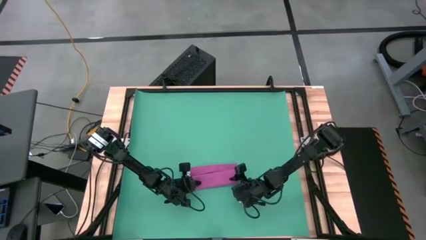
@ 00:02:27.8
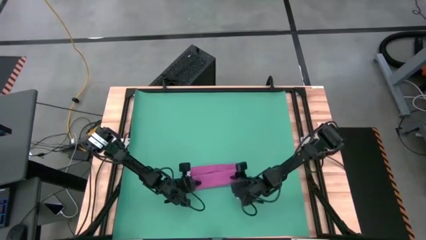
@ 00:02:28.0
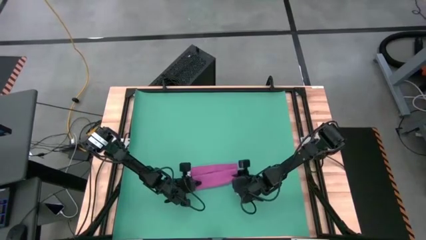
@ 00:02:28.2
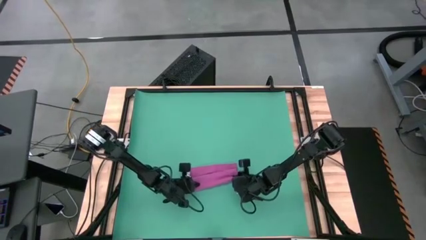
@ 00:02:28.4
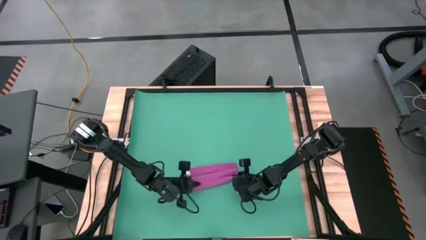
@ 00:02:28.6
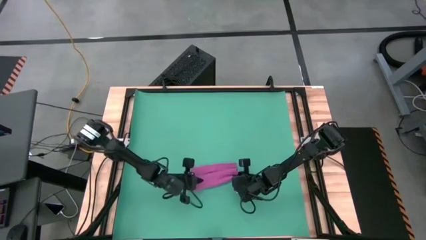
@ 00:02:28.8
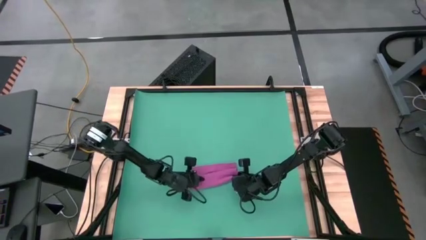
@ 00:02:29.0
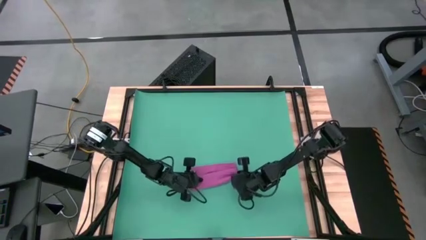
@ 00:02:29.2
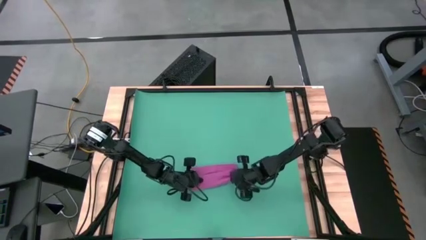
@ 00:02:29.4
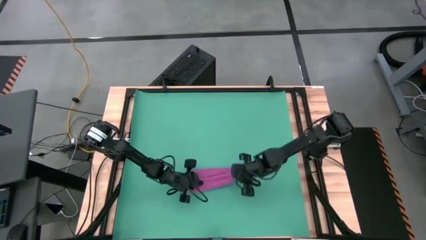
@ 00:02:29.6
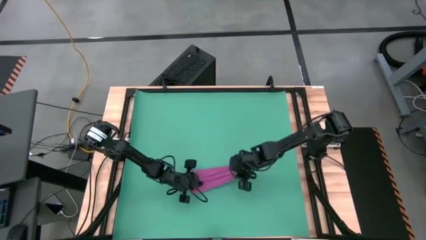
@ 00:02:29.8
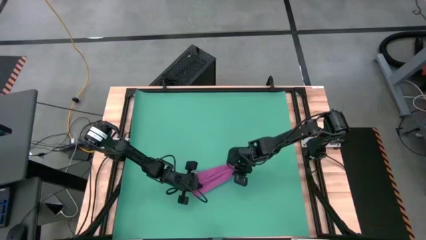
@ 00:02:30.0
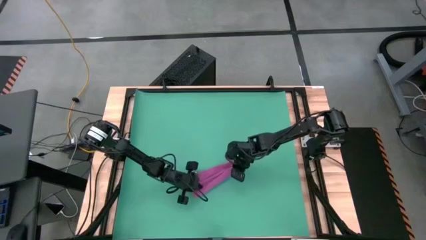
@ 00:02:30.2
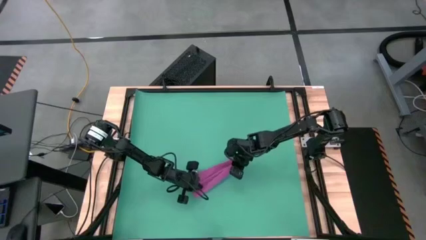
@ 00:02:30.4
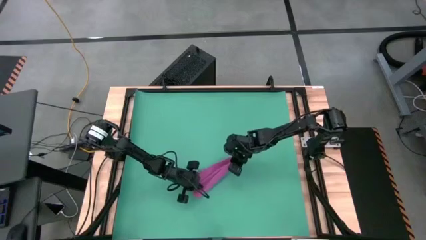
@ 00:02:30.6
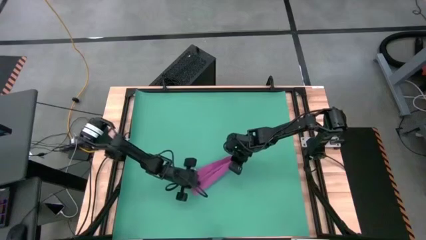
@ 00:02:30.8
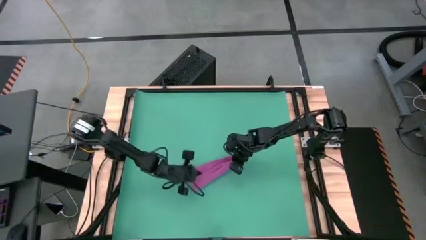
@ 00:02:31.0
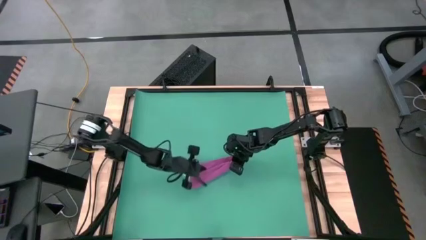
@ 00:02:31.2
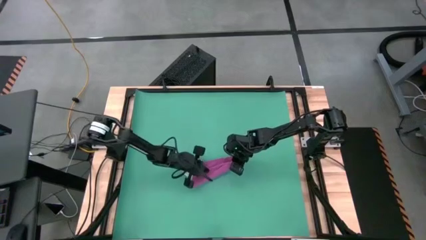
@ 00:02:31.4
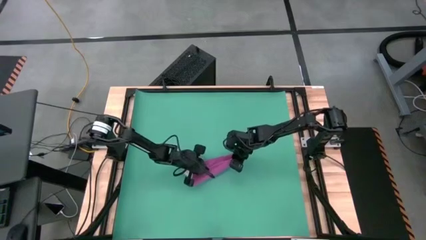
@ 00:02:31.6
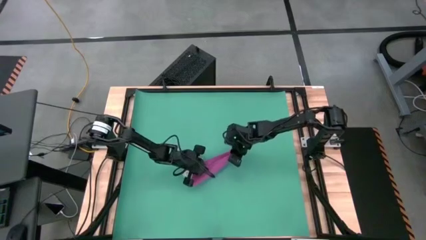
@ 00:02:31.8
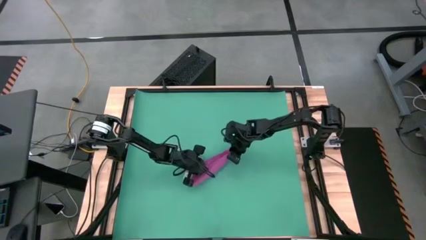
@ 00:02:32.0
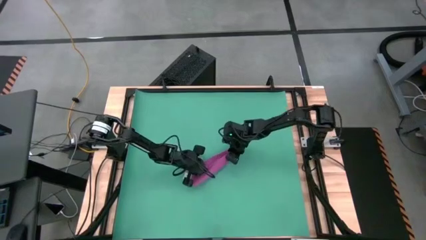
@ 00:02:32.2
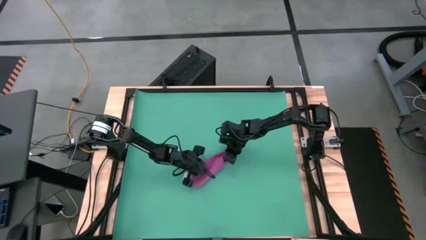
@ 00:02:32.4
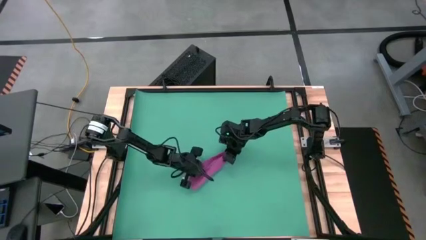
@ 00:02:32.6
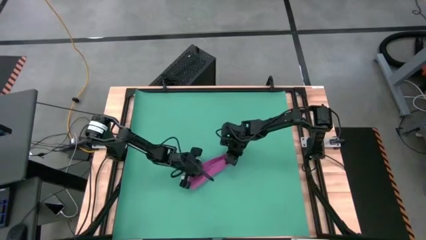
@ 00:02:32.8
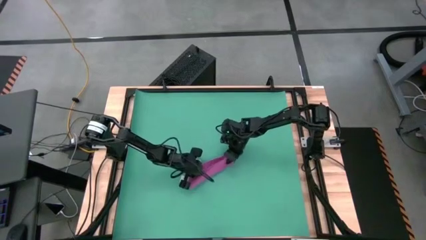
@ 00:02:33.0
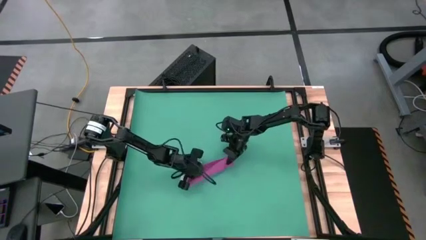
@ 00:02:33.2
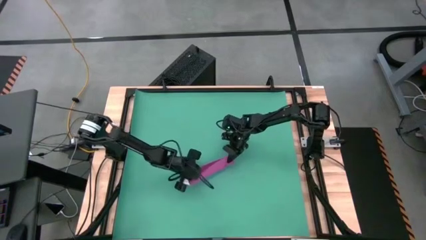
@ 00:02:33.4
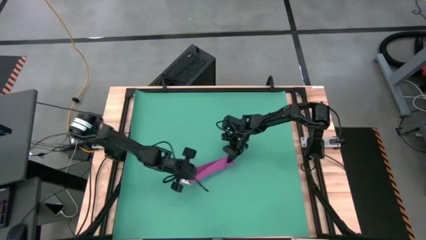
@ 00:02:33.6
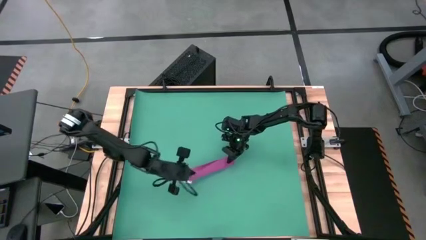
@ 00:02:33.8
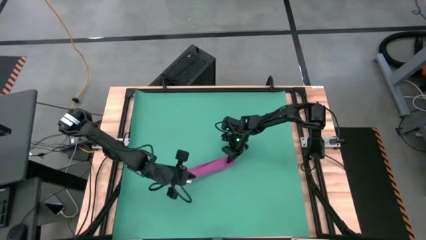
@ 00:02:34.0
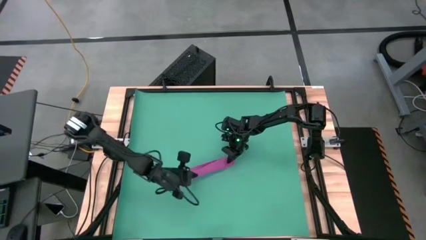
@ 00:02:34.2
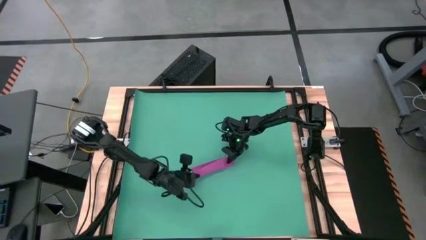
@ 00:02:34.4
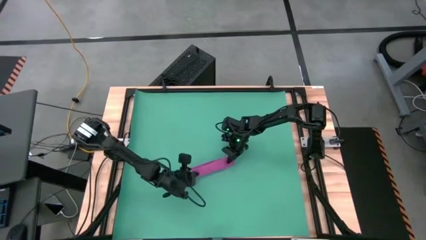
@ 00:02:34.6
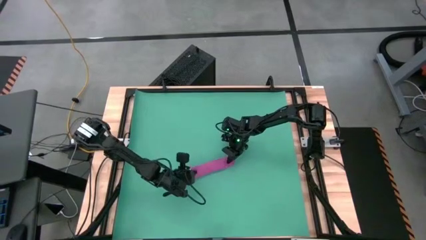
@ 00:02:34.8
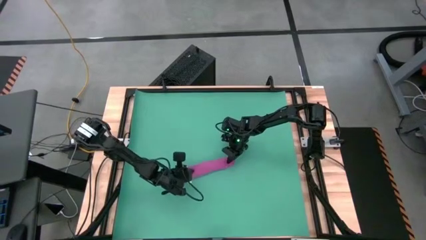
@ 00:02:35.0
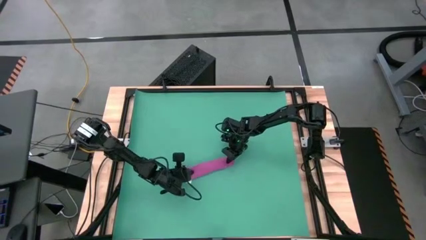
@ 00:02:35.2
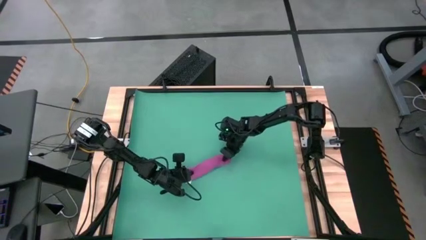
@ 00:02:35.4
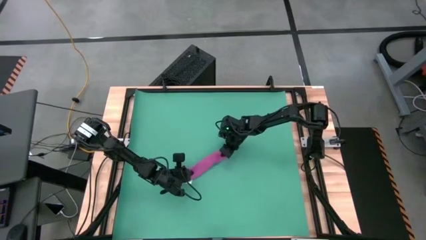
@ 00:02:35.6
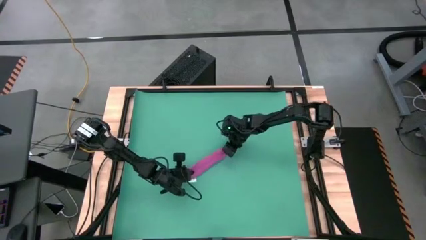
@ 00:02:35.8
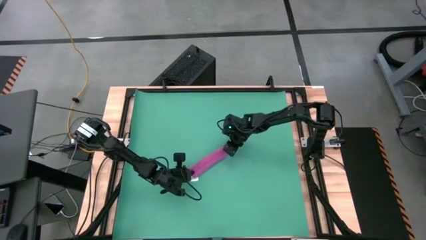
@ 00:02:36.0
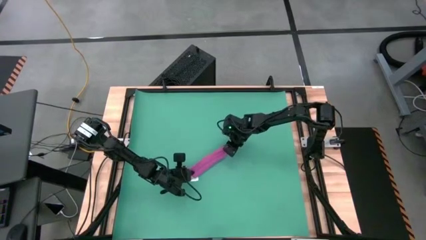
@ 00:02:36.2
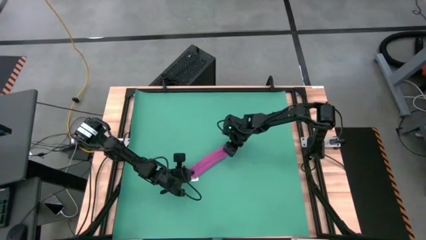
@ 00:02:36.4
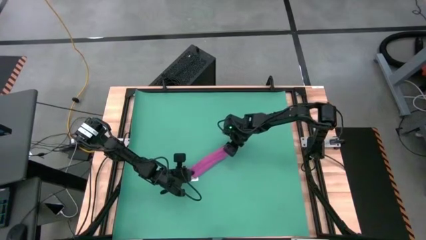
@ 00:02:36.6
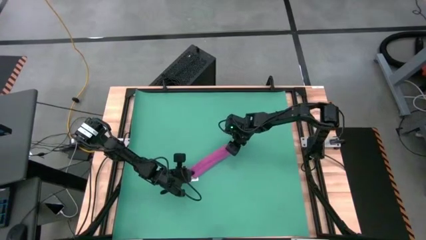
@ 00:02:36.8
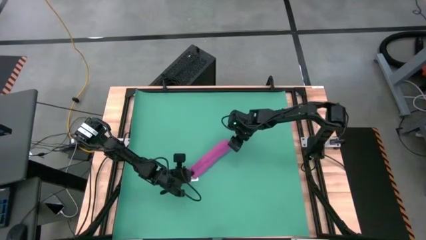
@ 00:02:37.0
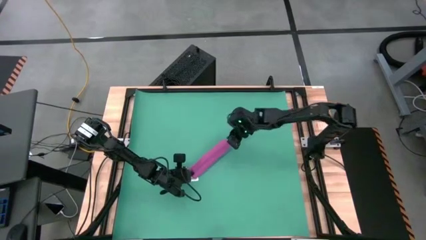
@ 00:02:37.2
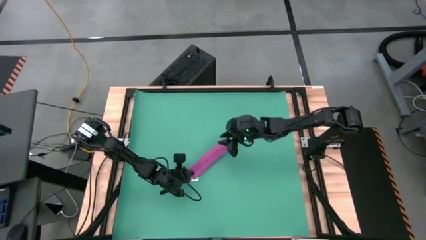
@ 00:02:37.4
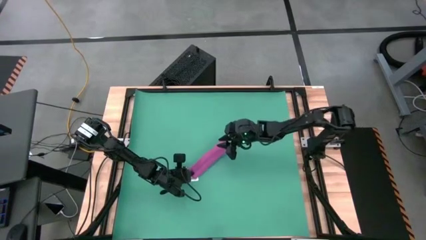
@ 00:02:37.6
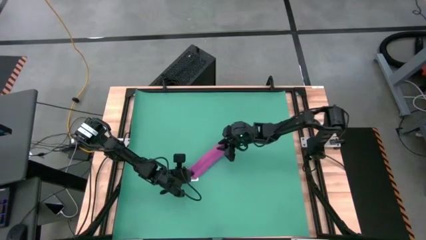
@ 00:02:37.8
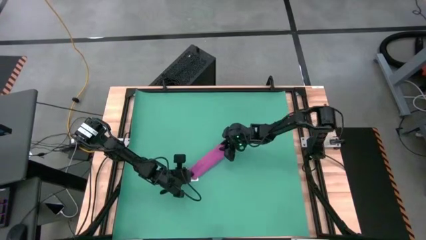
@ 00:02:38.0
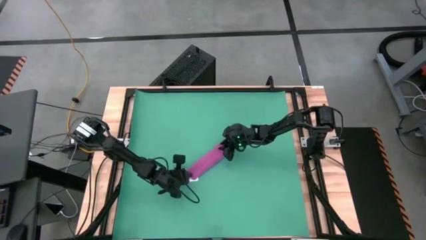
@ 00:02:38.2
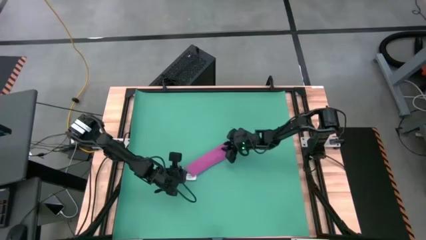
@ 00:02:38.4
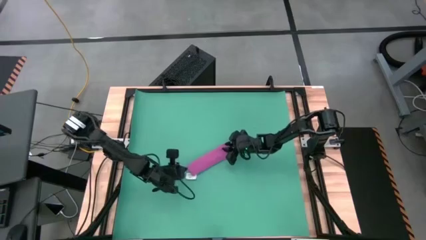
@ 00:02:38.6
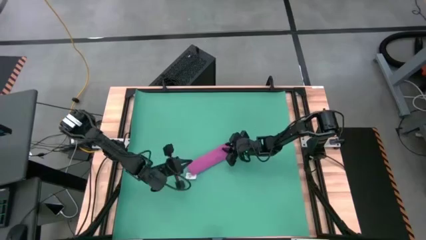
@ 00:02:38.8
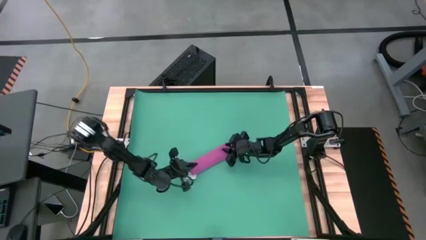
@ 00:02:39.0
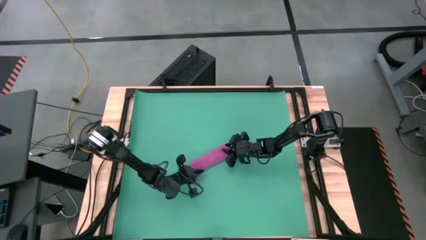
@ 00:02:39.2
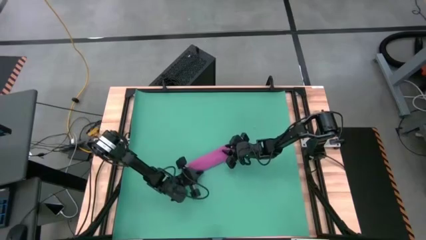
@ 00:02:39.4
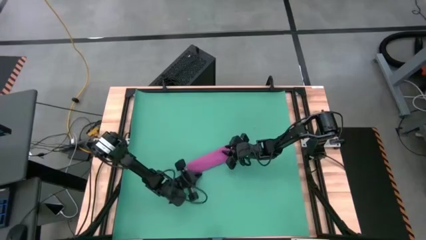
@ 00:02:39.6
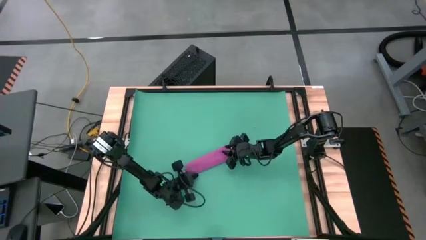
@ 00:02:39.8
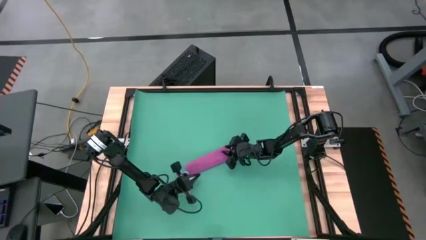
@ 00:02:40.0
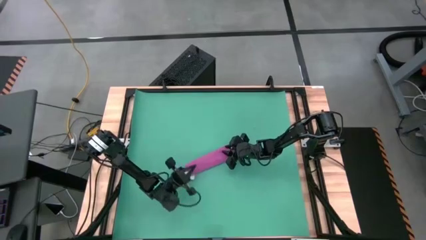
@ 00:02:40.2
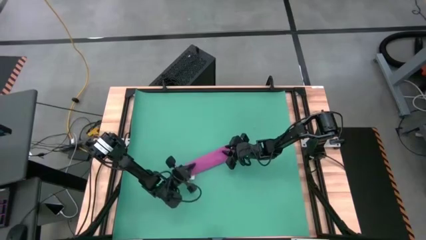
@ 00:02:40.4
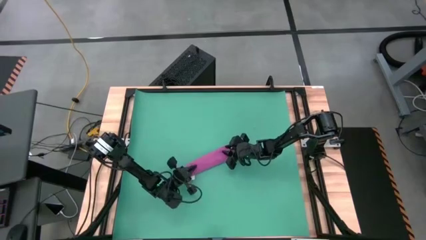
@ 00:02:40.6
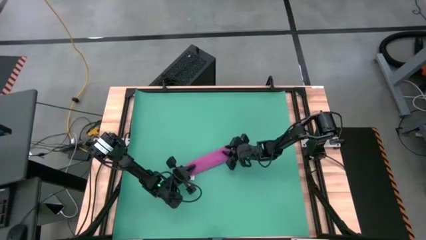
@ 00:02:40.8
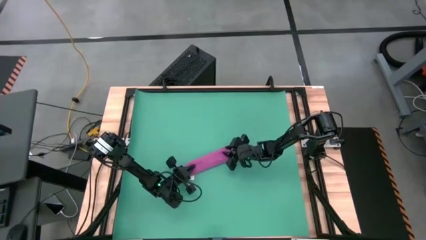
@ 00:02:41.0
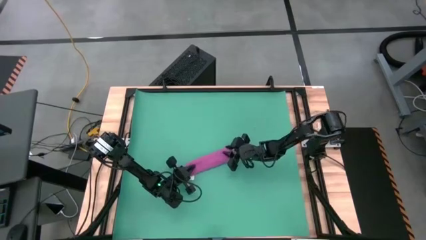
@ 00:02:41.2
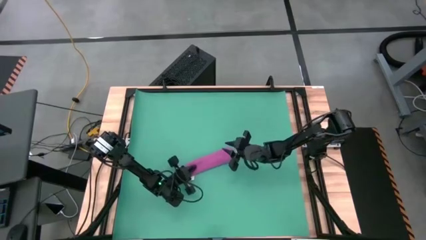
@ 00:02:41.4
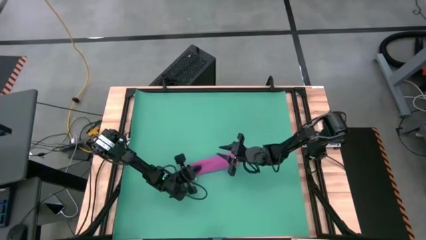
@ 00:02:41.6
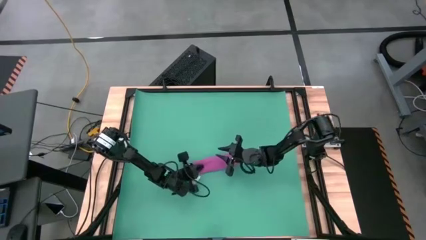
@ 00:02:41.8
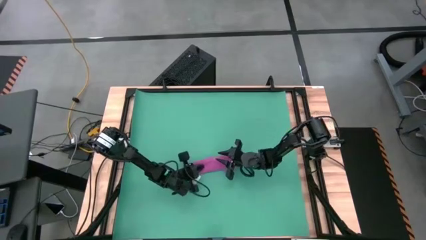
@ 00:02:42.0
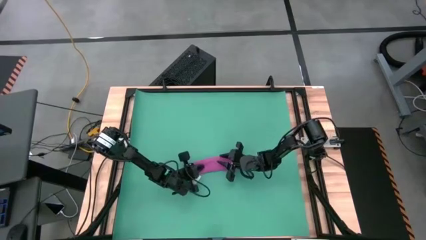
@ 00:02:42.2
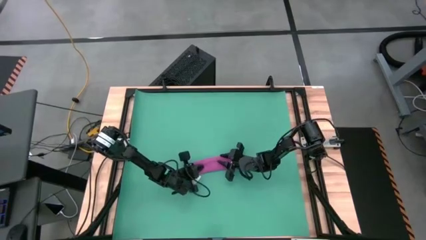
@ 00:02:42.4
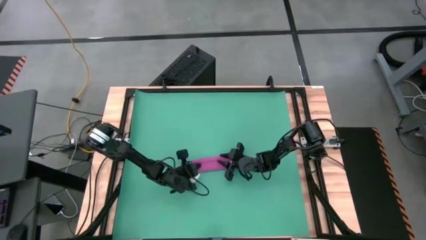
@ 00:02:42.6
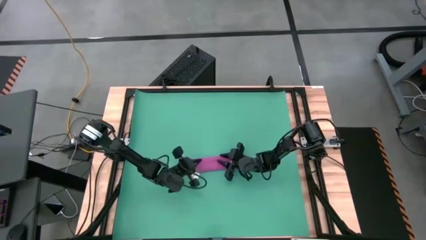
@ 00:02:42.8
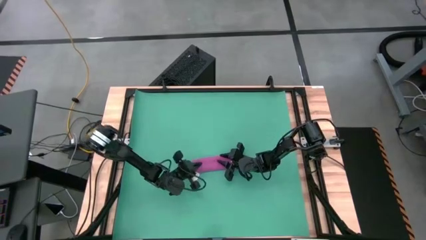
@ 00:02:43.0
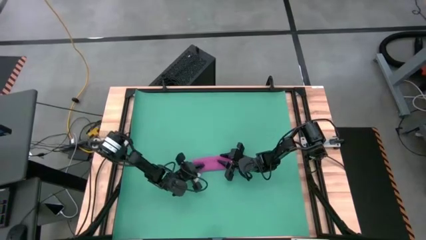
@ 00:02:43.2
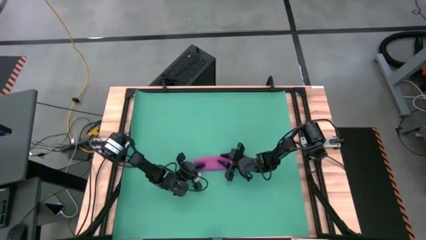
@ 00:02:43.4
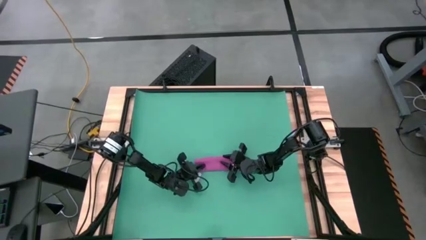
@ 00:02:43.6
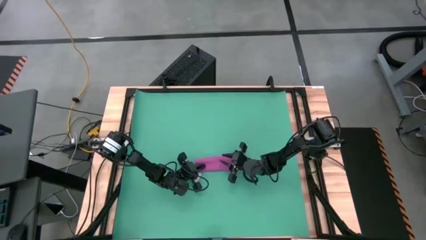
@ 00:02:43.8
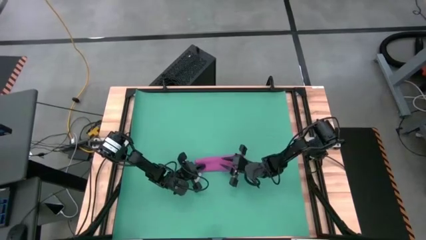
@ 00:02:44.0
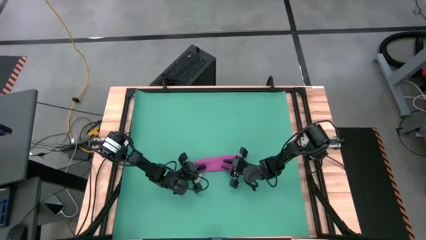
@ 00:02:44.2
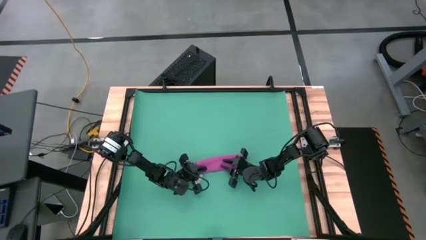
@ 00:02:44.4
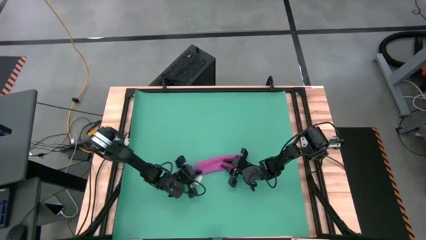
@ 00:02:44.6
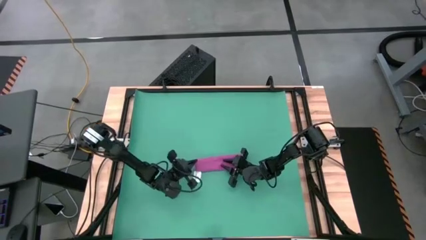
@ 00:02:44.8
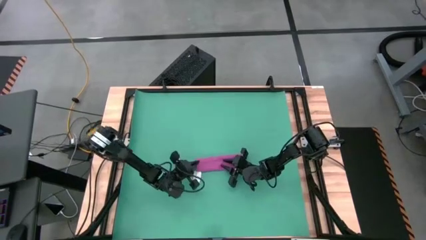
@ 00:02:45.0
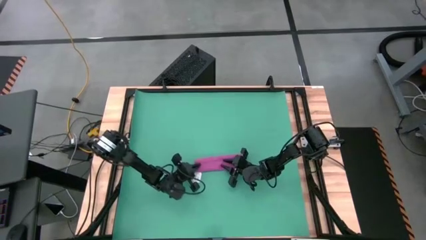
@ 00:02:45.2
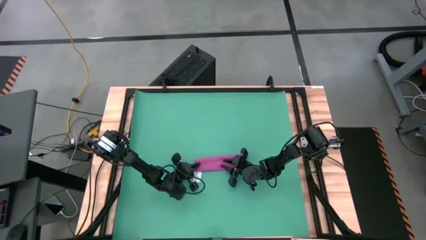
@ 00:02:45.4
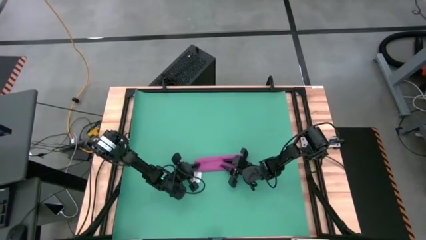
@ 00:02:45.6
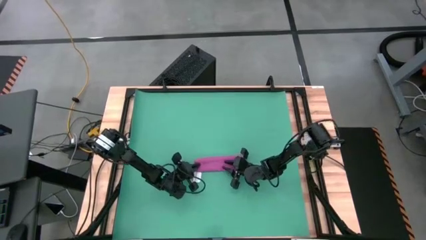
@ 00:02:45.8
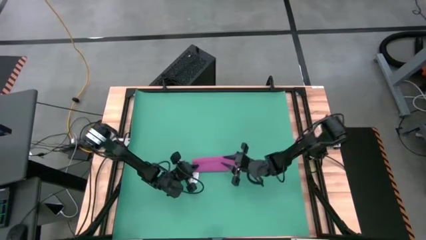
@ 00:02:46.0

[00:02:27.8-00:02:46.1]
Task: Roll towel
Roll the pink towel
